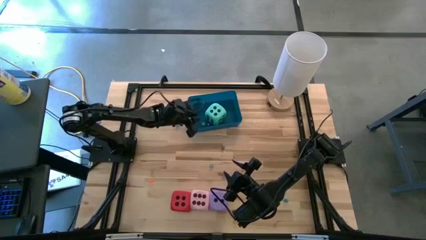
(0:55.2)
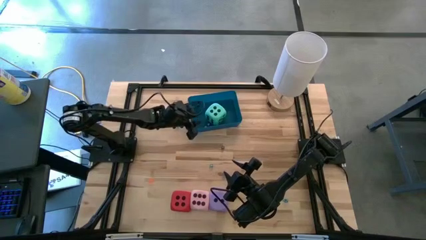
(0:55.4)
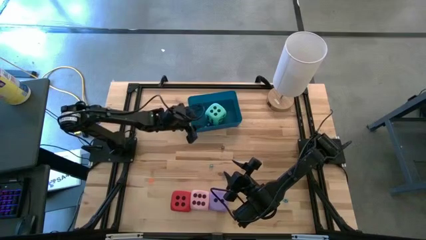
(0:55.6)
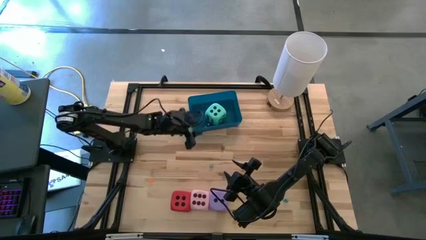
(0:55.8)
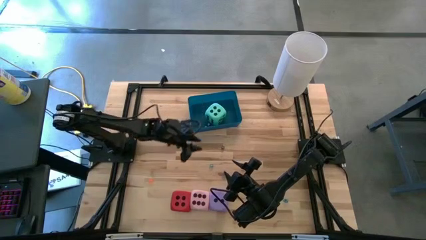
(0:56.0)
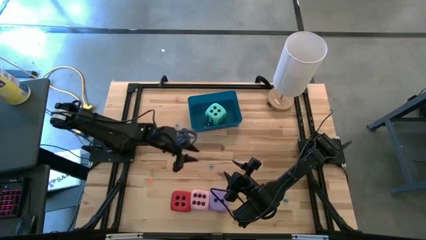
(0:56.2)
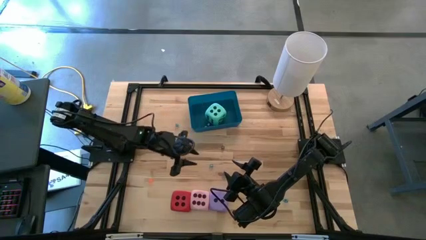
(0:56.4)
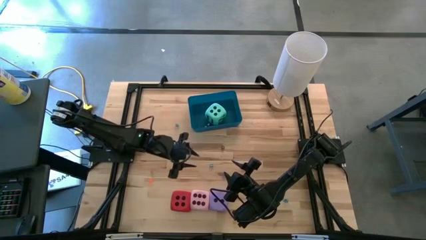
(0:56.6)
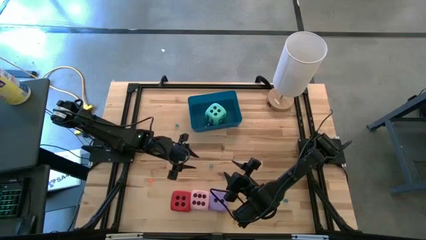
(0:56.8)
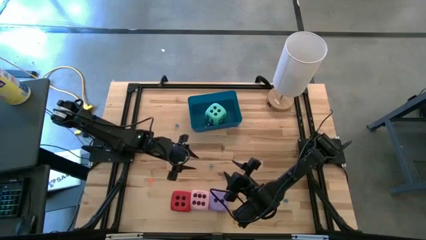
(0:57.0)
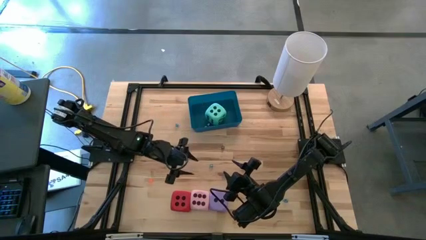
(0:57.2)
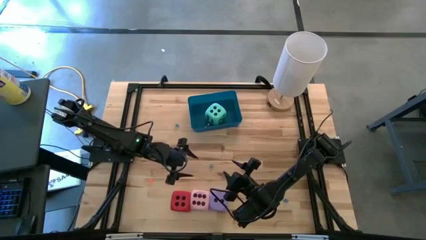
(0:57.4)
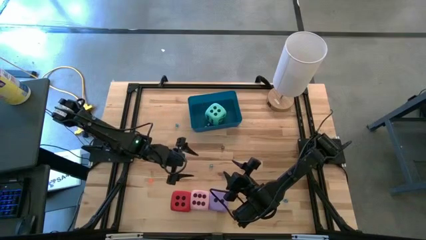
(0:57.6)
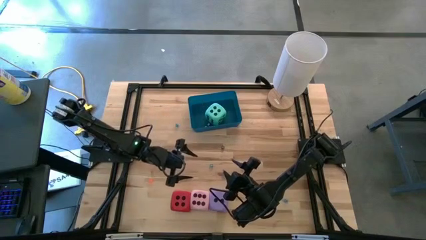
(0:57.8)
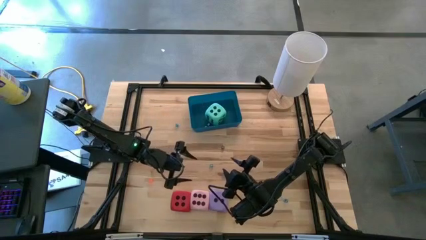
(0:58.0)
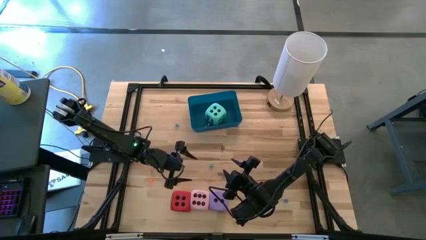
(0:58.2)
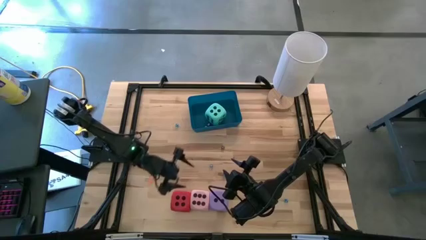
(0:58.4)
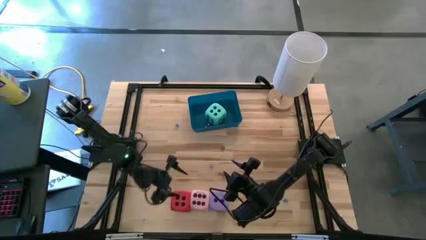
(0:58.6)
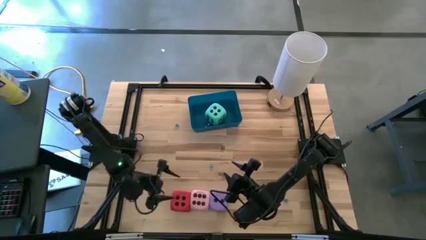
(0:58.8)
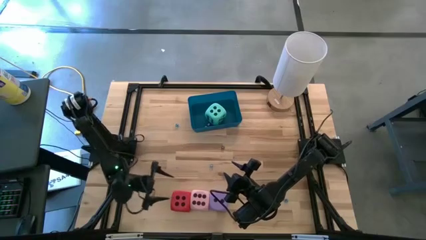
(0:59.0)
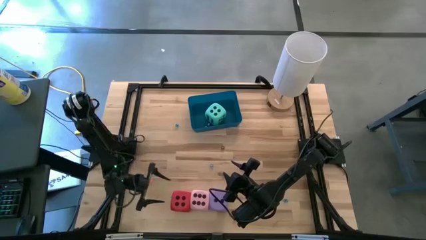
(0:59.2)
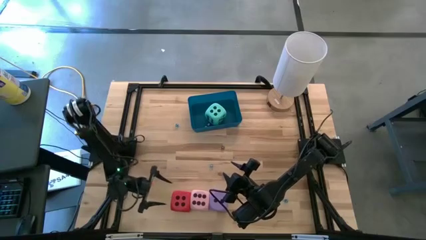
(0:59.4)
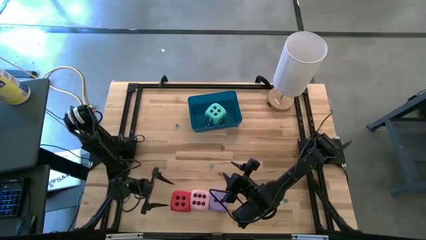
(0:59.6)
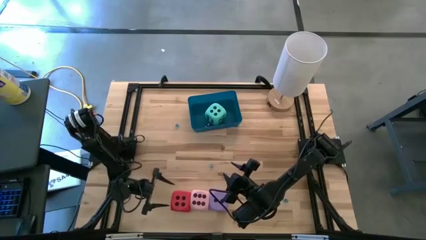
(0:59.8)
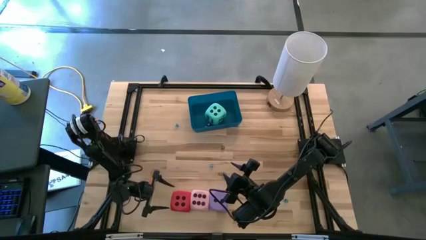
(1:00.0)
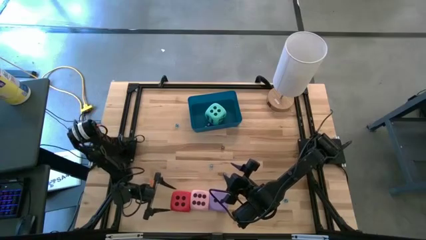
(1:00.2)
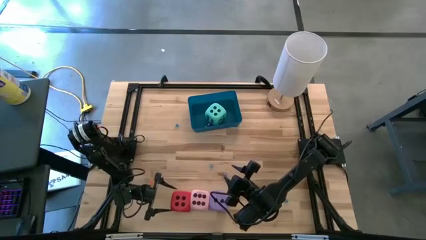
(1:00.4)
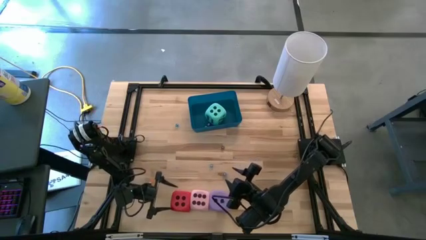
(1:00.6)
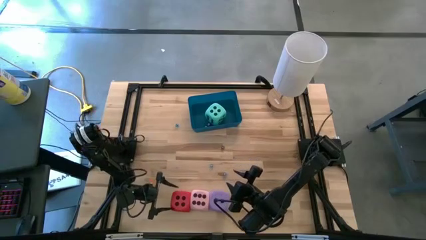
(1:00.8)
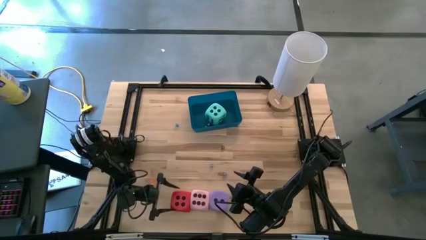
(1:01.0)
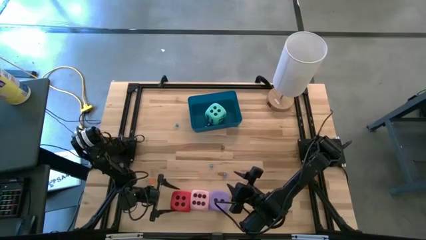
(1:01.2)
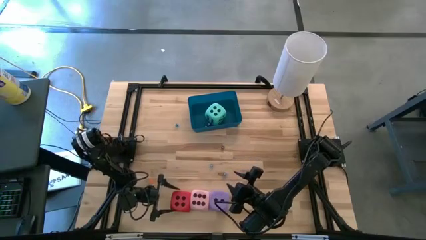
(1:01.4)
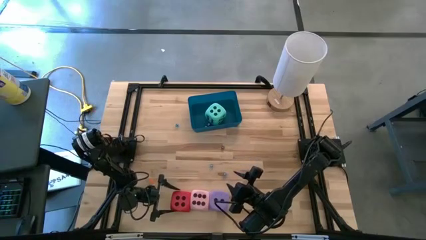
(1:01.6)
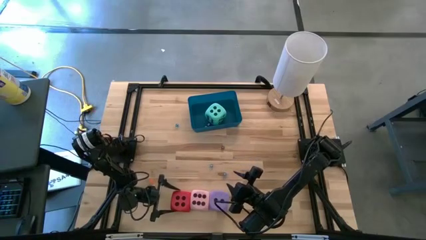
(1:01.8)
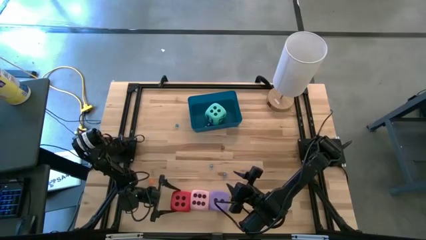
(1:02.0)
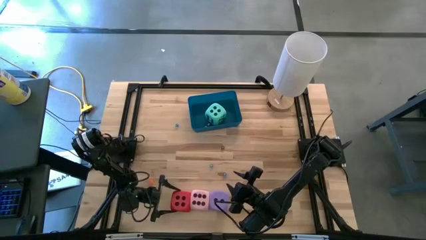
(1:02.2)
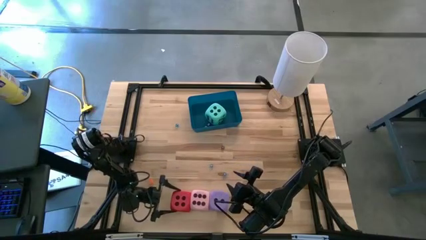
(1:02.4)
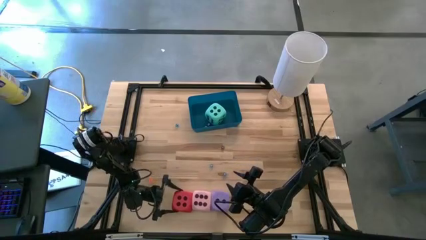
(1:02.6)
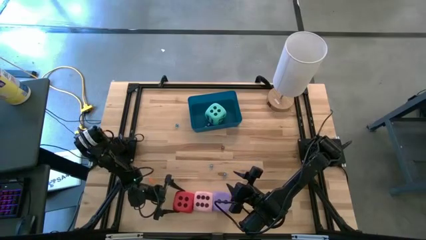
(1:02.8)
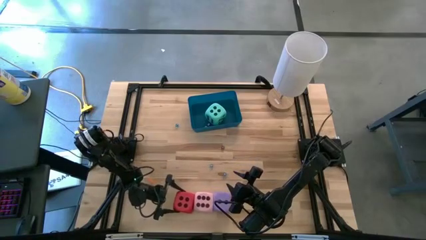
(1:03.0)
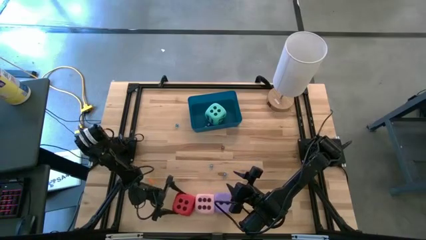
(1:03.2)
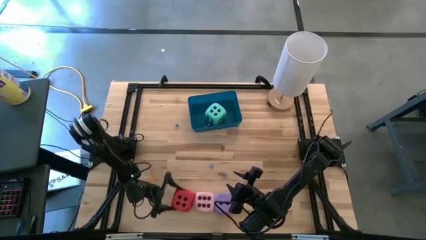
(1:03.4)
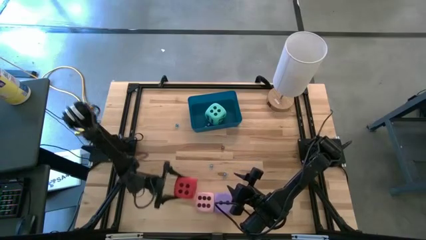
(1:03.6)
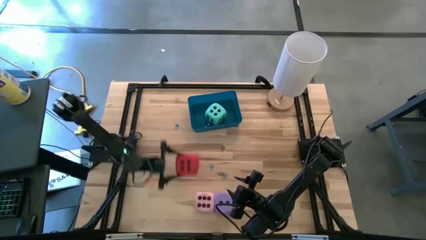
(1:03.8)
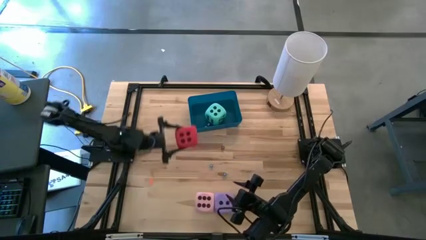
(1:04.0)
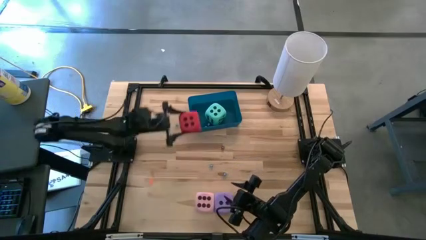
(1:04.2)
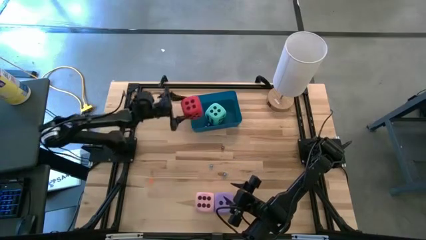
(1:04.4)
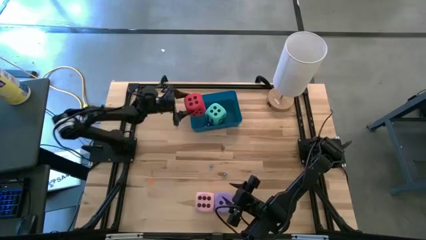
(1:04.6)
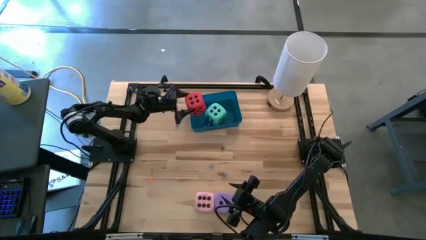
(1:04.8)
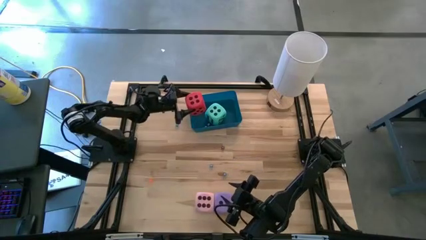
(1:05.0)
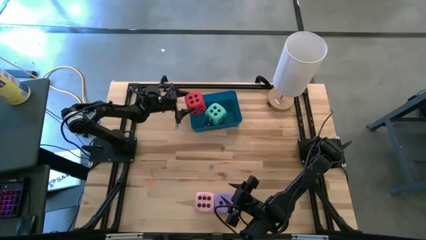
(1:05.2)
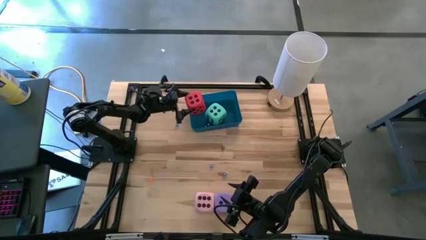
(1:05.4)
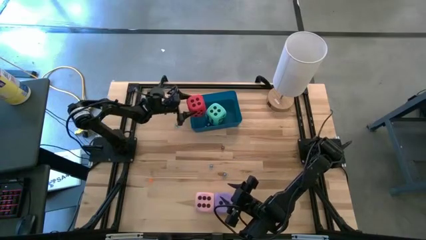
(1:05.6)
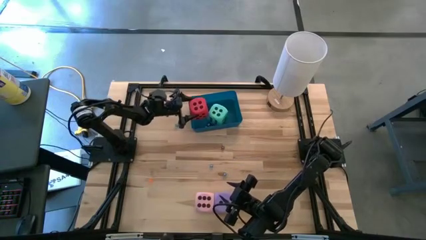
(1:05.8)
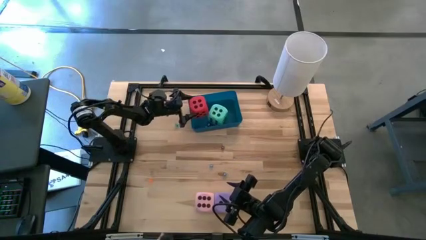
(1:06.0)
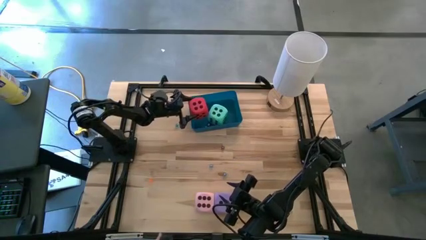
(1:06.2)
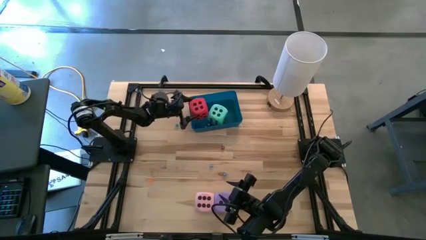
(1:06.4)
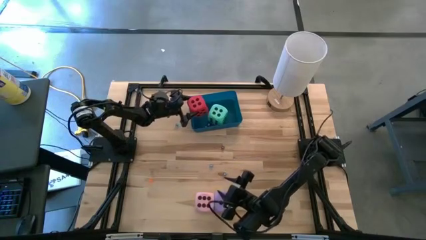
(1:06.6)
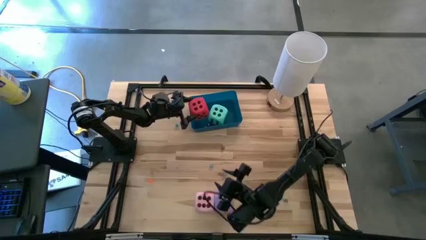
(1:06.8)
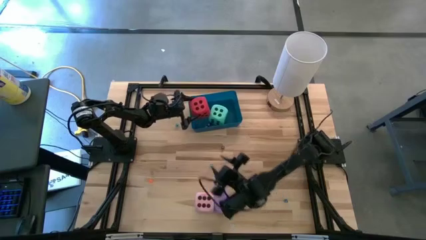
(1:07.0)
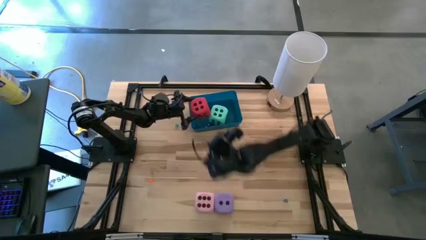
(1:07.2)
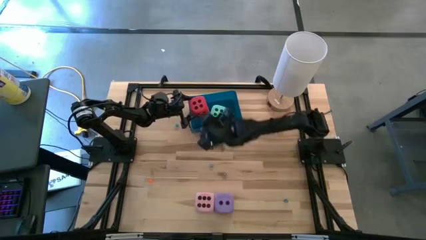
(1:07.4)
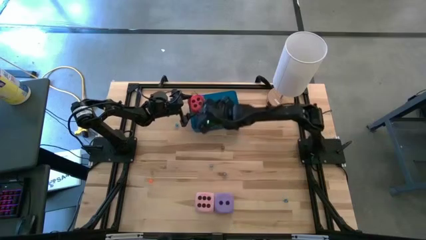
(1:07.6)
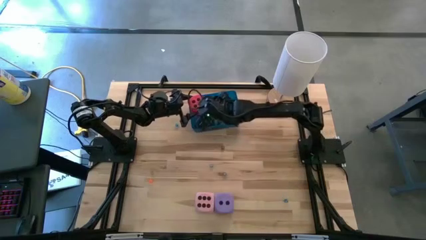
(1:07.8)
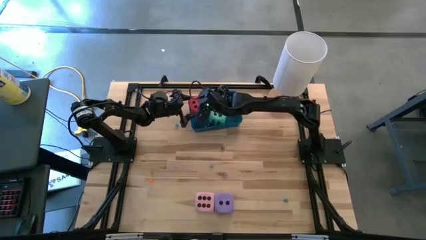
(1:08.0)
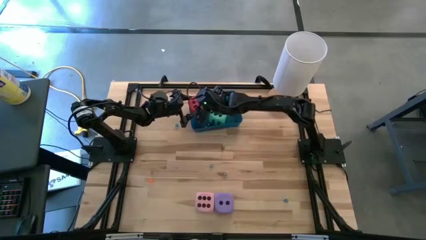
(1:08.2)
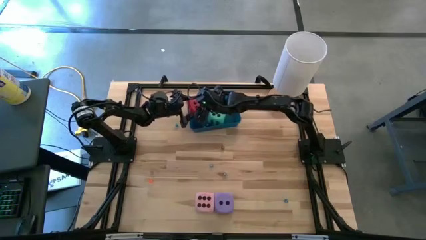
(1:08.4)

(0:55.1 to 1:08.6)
Task: Pick & Place Dice
Put the large red dice into the blue bin

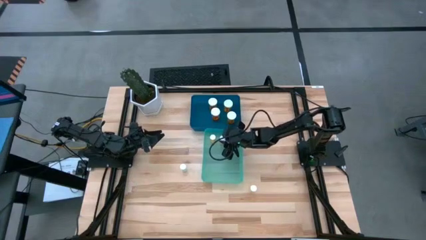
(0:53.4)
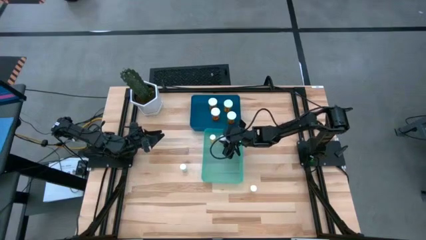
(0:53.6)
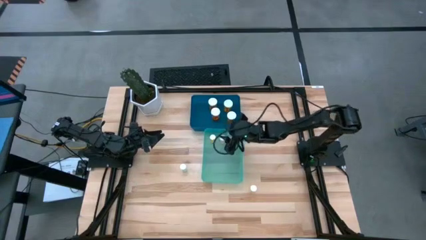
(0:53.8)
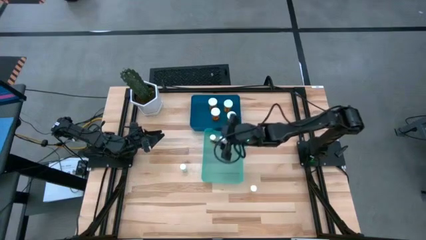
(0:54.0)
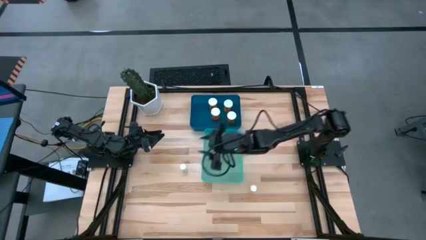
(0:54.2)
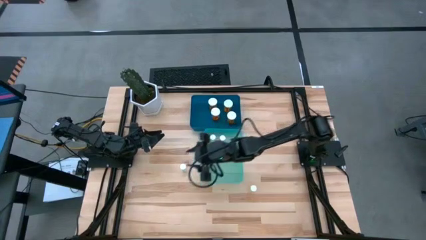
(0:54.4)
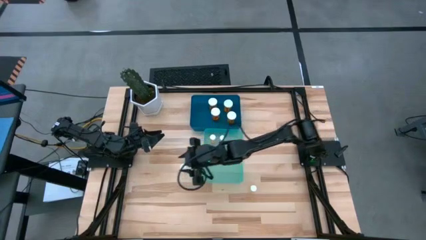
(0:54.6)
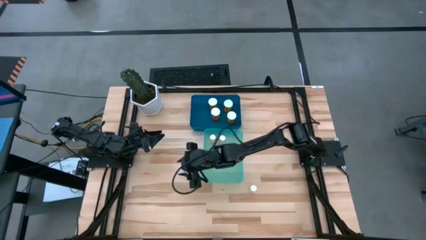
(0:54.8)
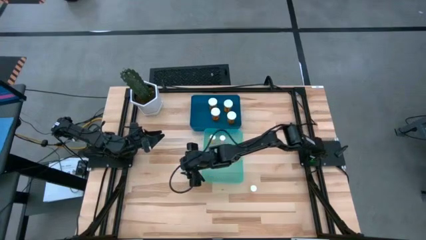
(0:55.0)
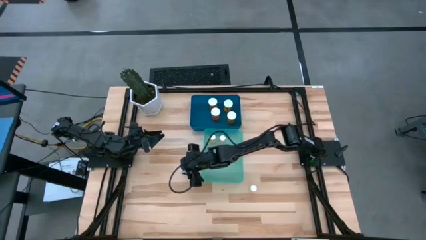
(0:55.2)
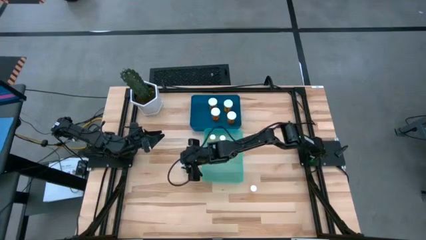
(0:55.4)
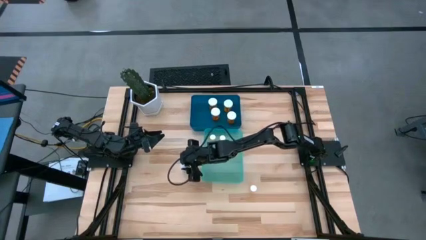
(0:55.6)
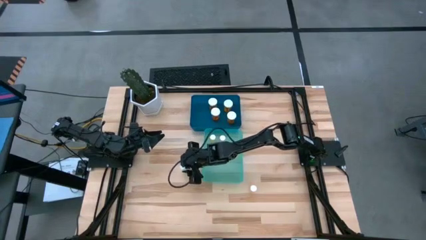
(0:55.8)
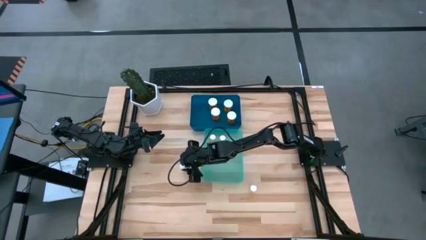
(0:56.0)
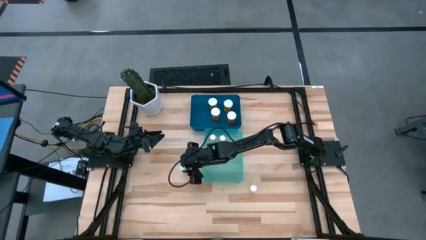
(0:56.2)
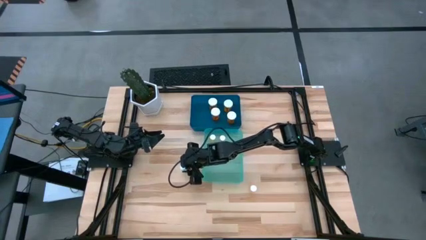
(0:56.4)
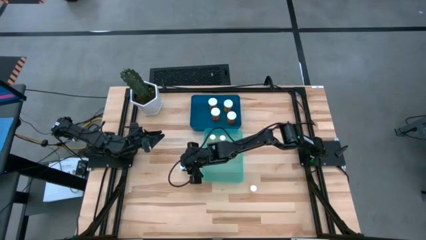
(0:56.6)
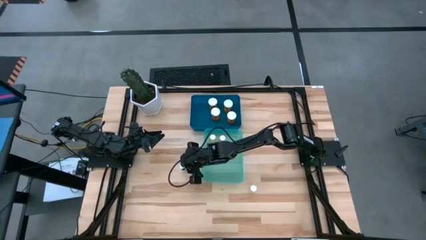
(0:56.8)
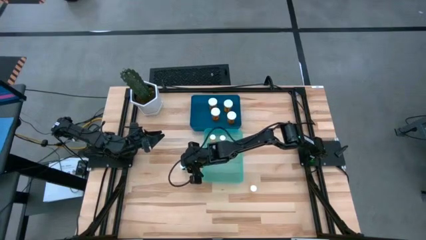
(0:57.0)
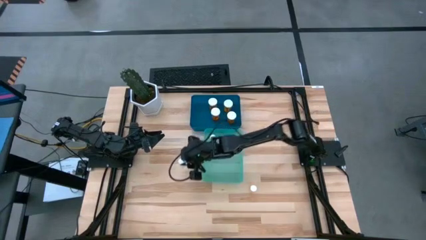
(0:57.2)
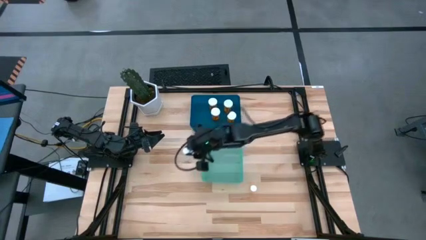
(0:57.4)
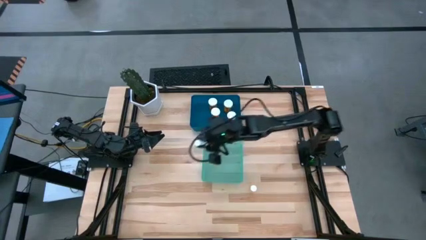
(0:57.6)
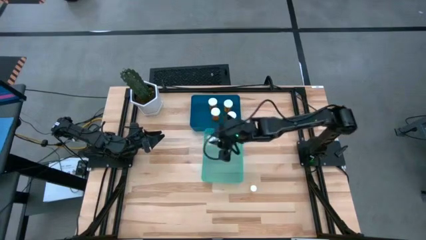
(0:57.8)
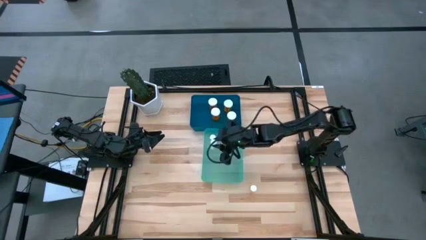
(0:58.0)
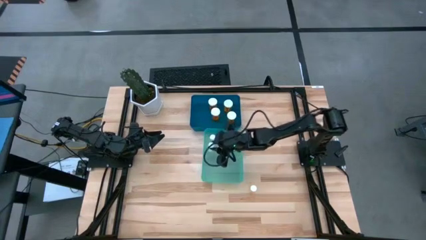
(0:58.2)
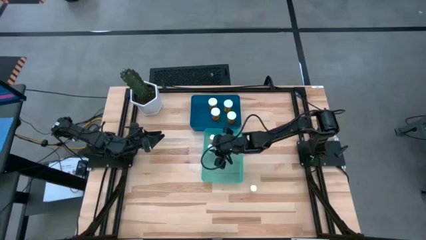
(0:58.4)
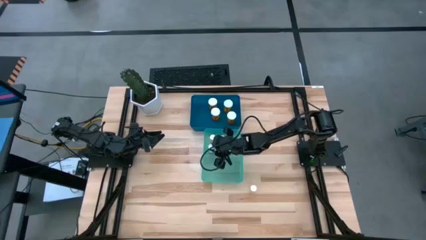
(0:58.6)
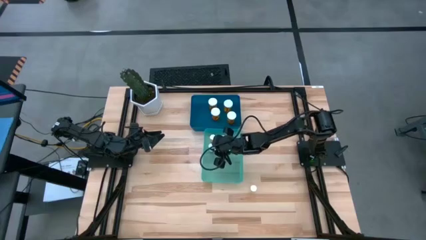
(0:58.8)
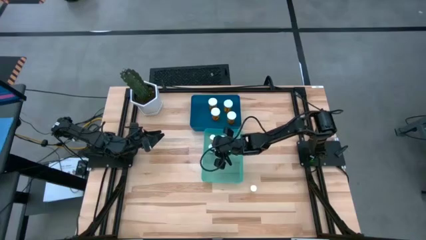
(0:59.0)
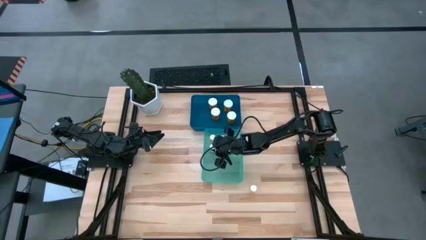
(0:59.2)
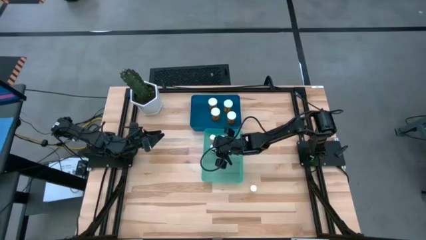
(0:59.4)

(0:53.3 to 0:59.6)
Task: Pick and place medicine bottles into bin by pill shape (circle, oval)
Put the small green pill bottle into the green bin
